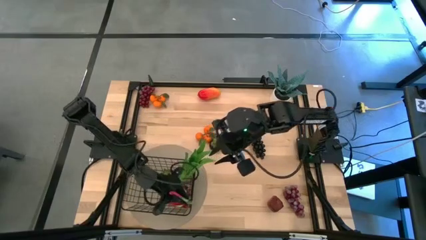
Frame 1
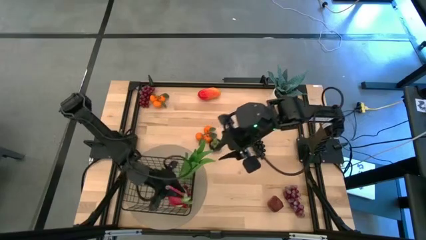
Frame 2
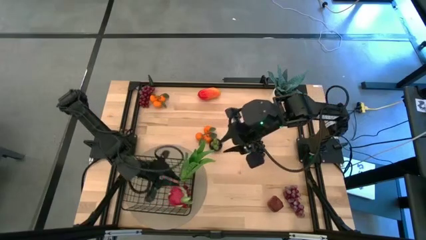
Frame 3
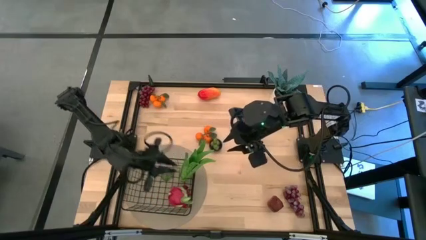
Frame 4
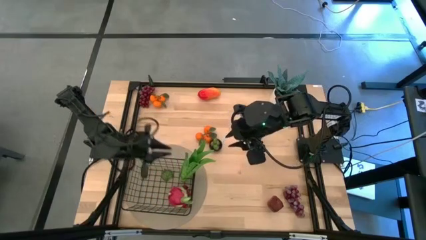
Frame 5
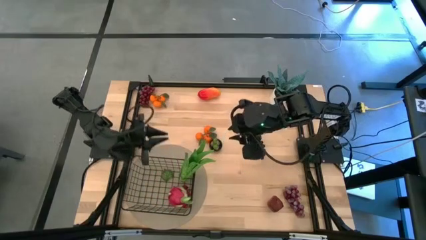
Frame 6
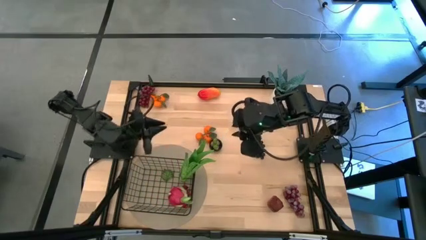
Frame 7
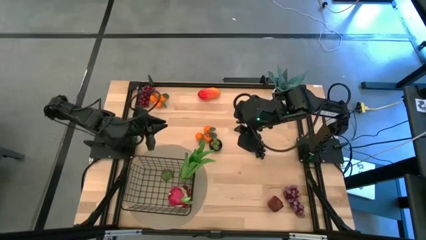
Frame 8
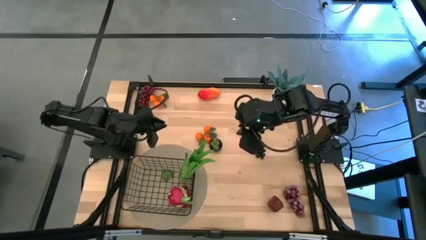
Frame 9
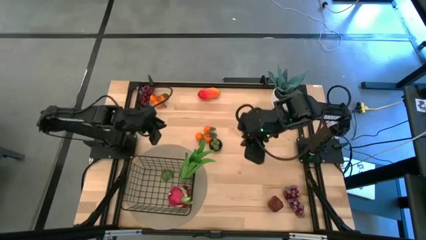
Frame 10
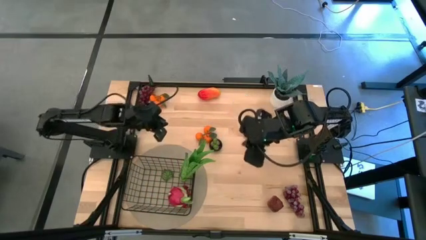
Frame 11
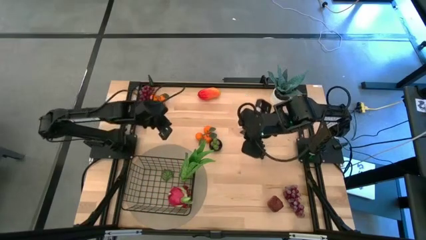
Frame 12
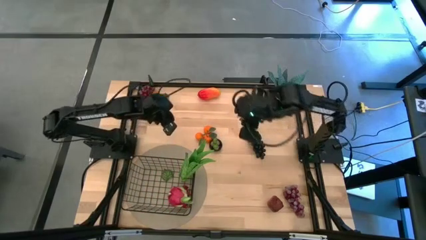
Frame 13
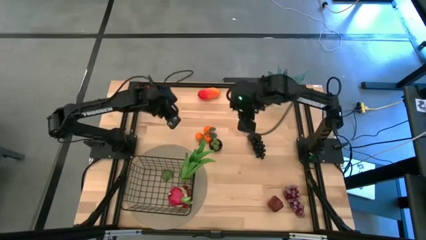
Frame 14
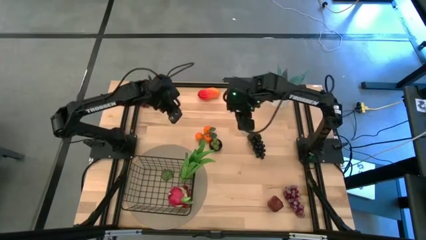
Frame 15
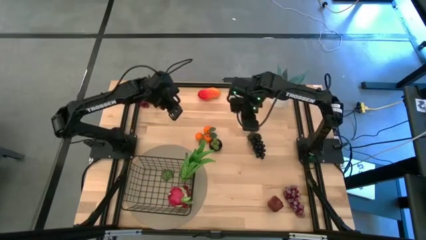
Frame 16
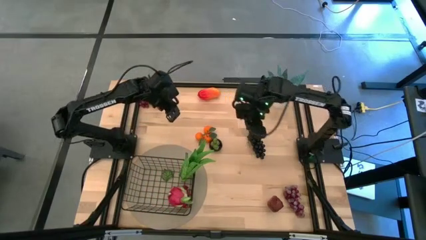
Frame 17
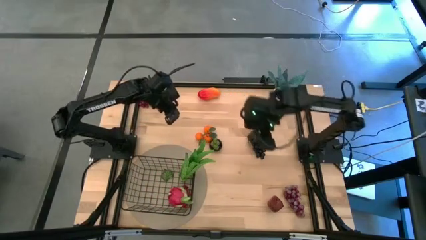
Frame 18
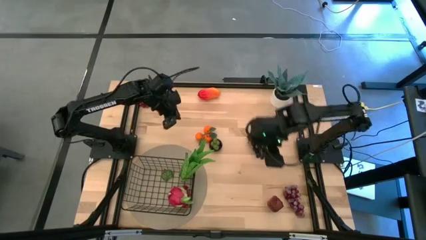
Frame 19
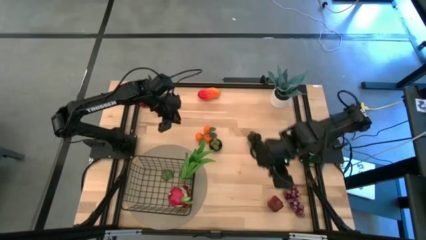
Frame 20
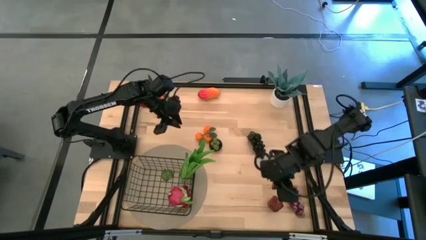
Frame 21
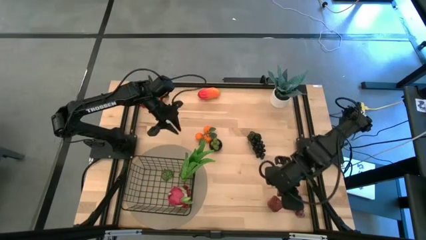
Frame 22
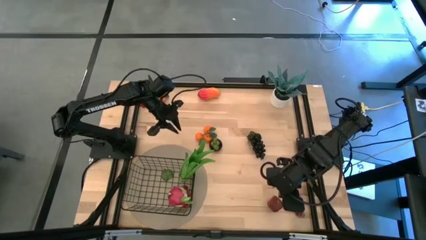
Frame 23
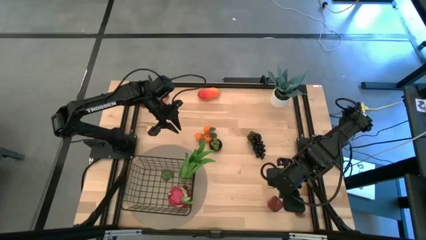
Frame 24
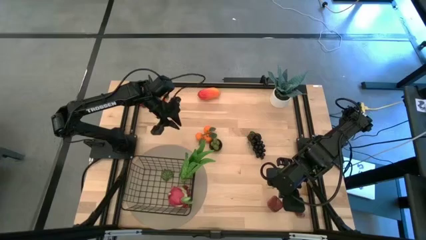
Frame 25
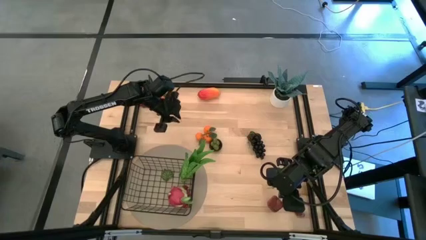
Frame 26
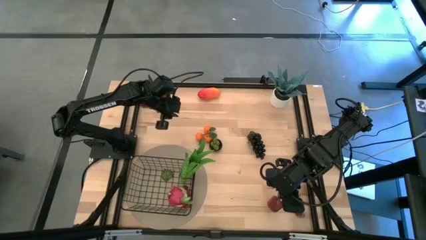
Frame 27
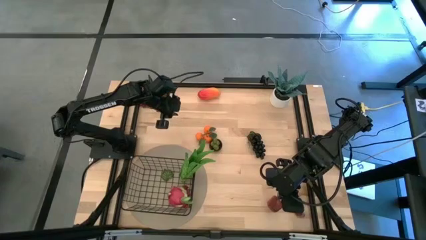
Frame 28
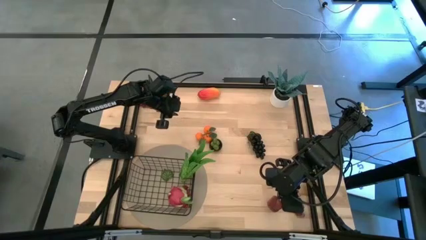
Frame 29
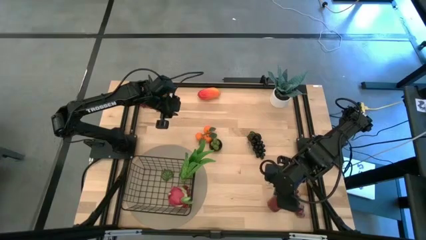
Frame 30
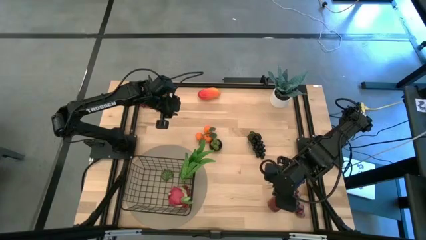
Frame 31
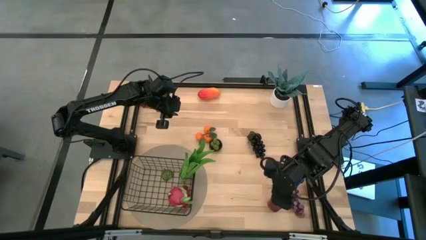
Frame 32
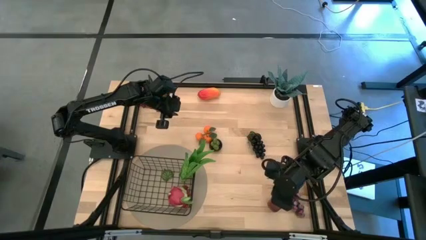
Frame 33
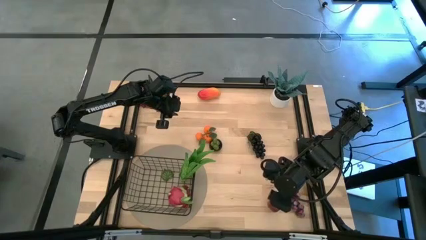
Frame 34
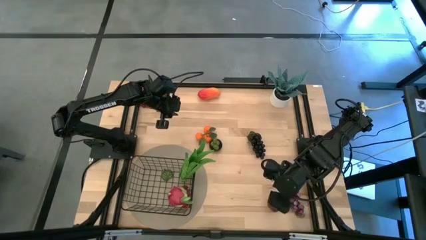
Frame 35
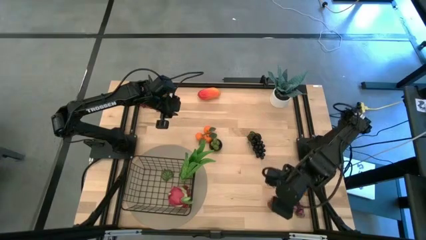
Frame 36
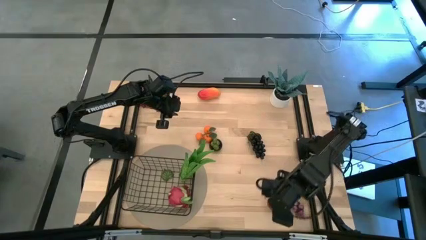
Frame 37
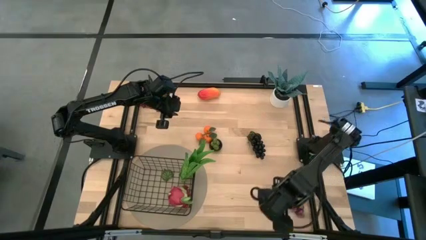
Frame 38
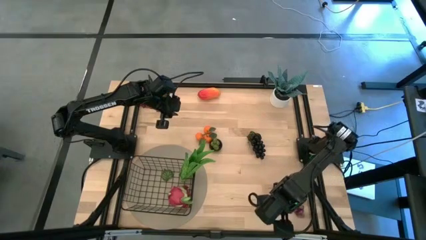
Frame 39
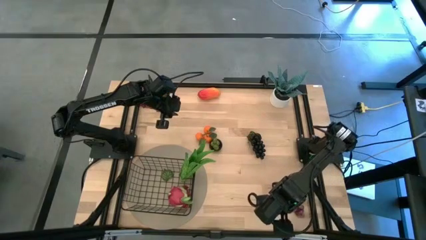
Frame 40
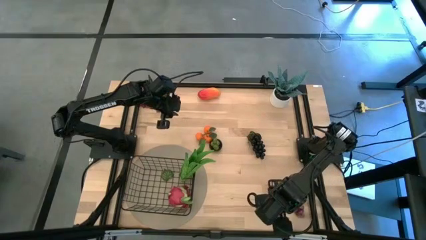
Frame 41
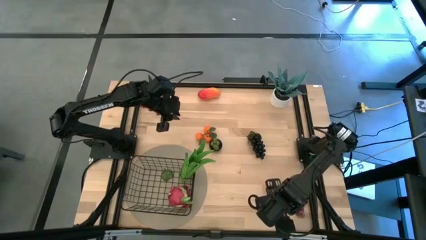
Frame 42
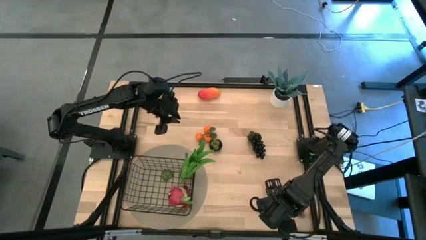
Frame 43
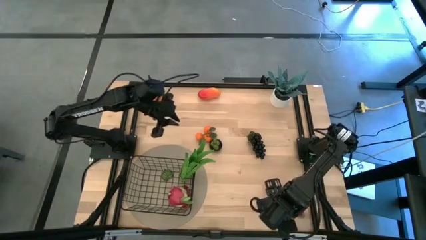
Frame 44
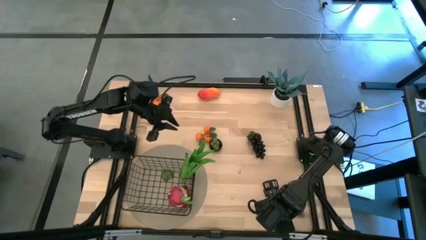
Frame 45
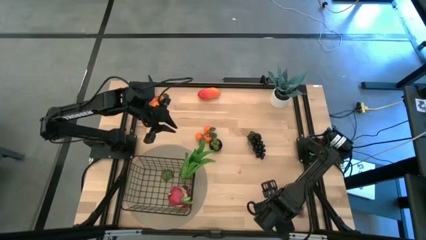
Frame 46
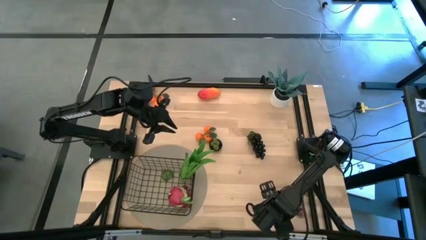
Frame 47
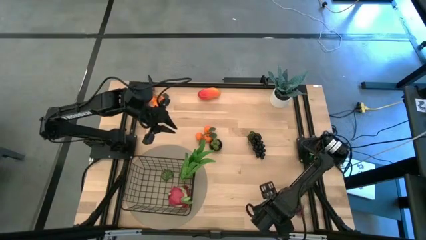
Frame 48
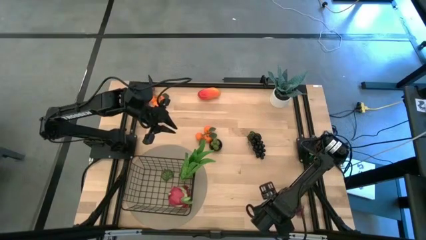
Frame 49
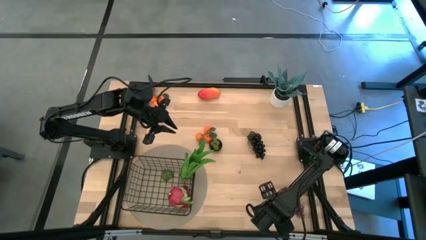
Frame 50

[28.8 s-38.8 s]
Task: Build produce basket
Put the red apple into the black wire basket

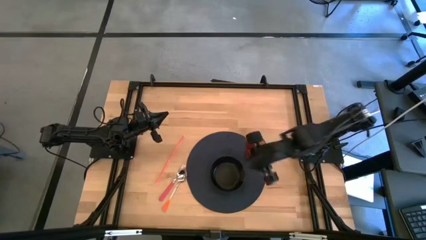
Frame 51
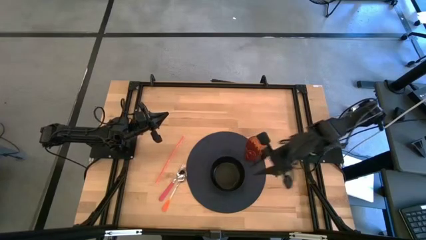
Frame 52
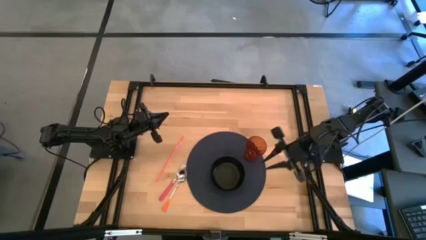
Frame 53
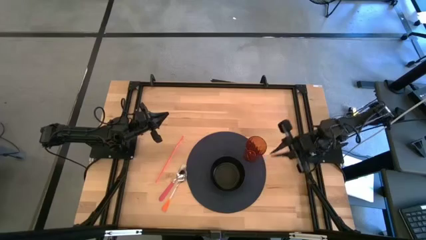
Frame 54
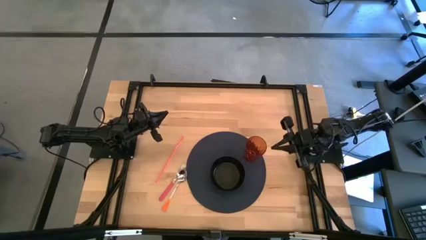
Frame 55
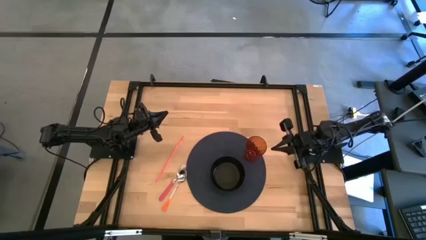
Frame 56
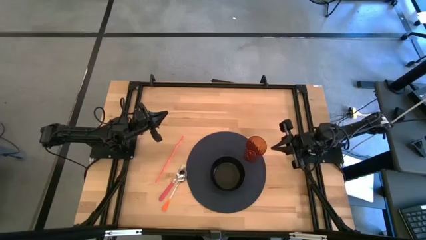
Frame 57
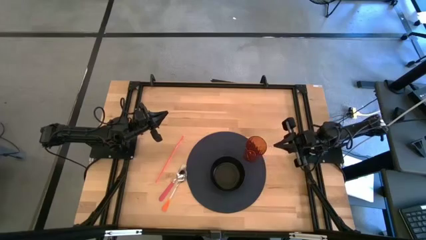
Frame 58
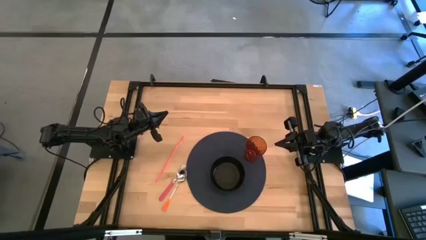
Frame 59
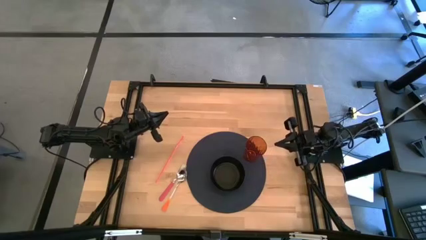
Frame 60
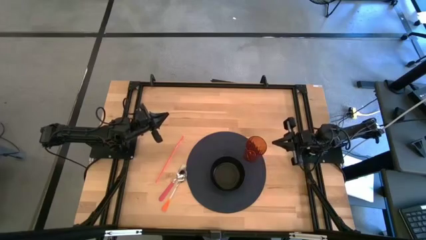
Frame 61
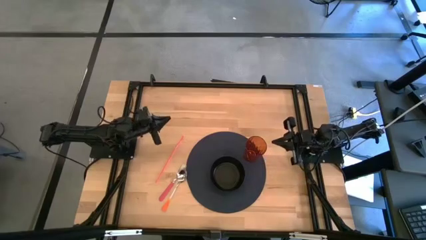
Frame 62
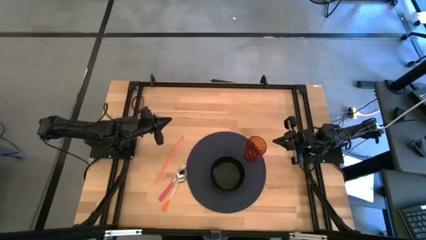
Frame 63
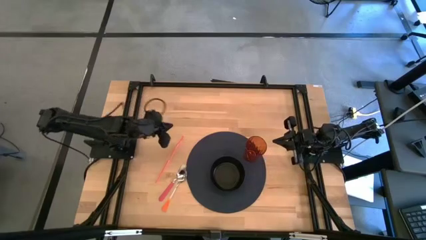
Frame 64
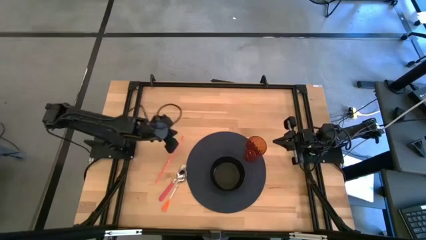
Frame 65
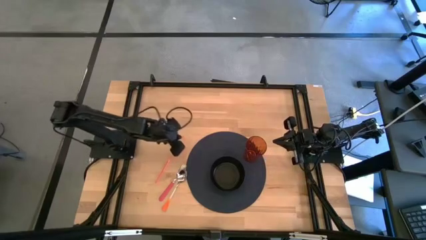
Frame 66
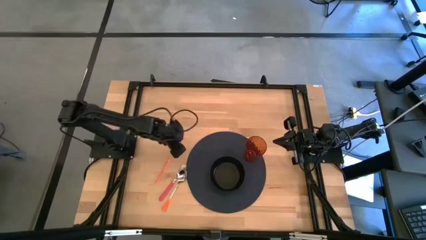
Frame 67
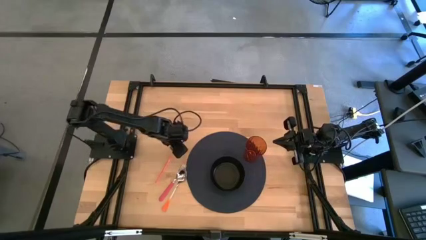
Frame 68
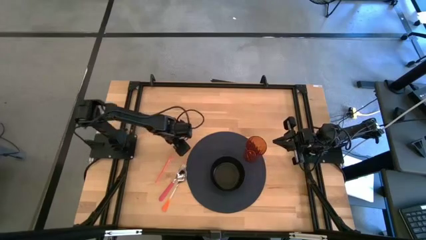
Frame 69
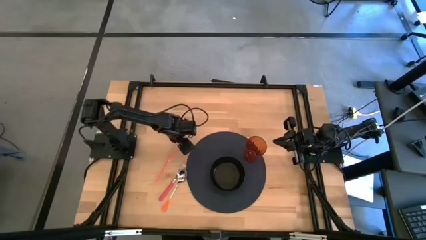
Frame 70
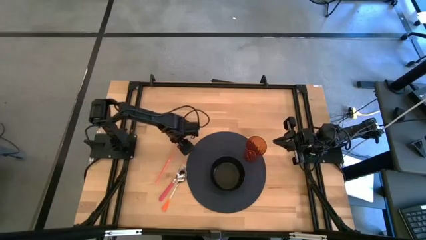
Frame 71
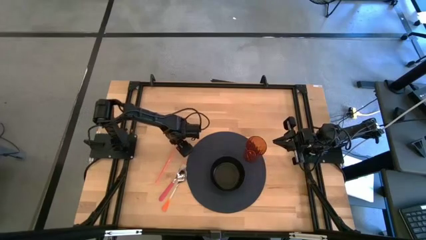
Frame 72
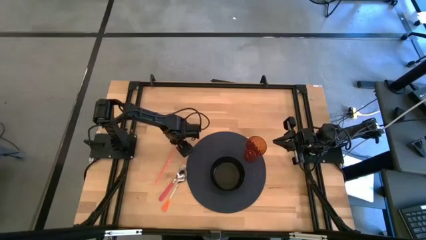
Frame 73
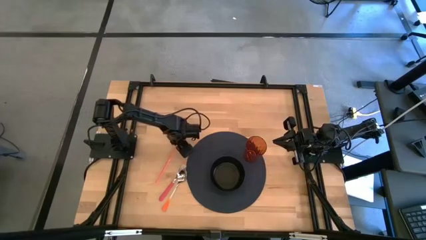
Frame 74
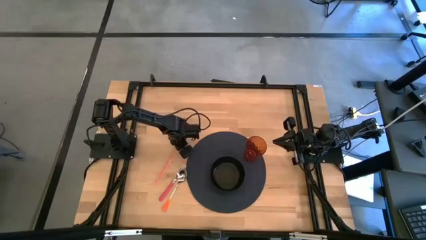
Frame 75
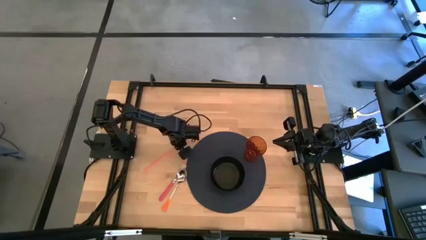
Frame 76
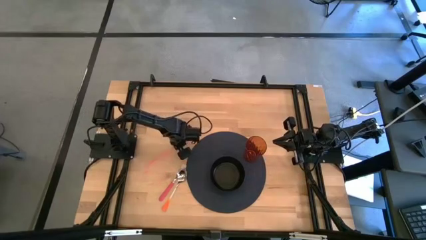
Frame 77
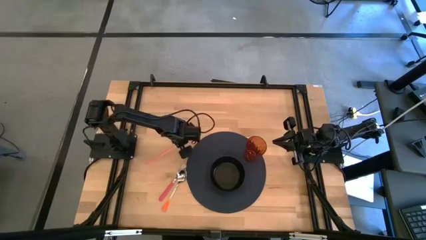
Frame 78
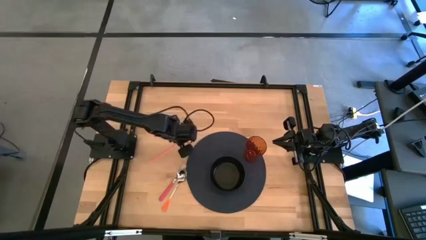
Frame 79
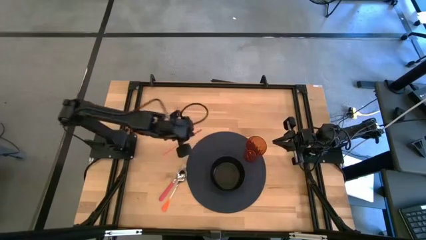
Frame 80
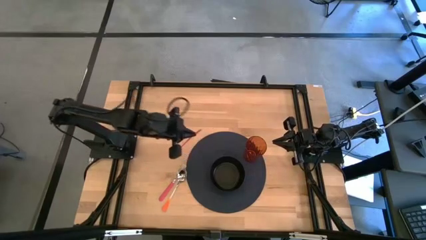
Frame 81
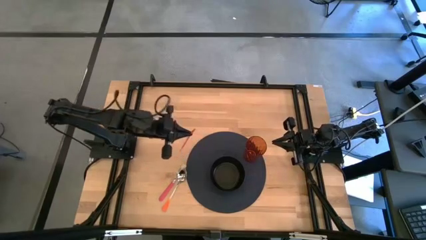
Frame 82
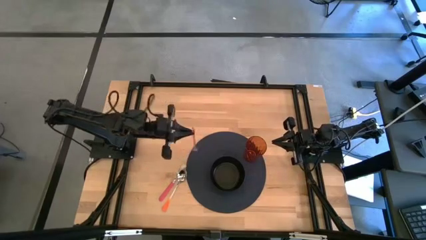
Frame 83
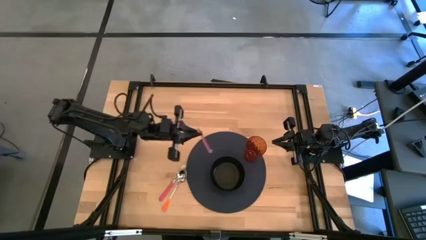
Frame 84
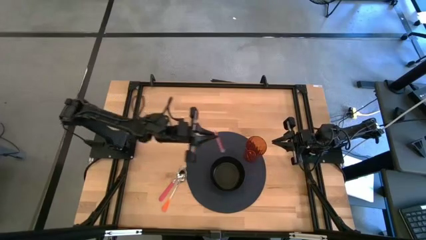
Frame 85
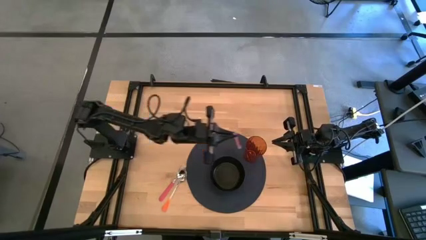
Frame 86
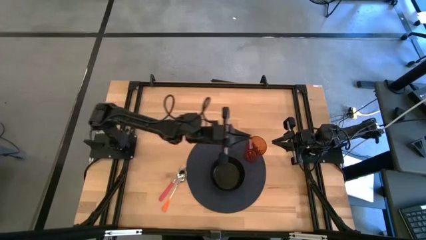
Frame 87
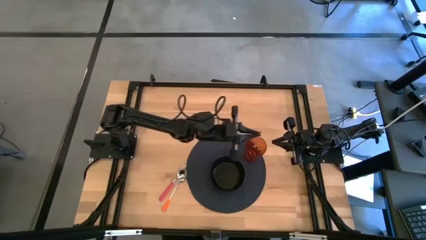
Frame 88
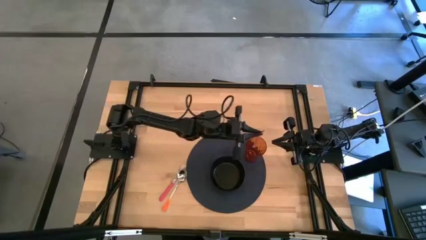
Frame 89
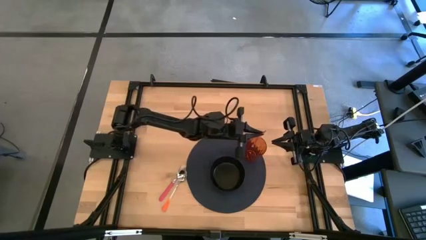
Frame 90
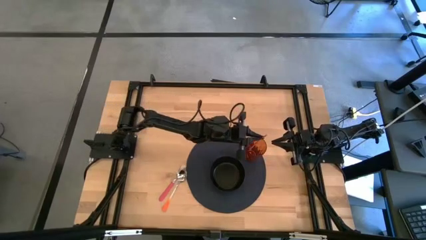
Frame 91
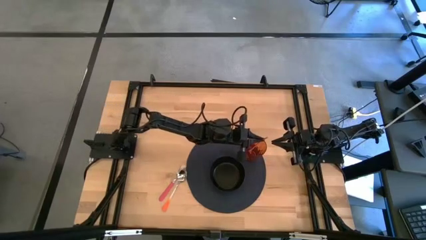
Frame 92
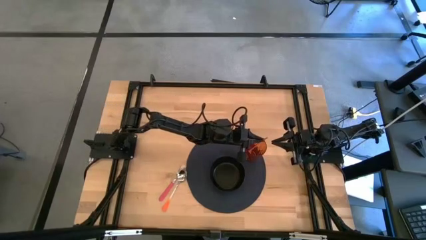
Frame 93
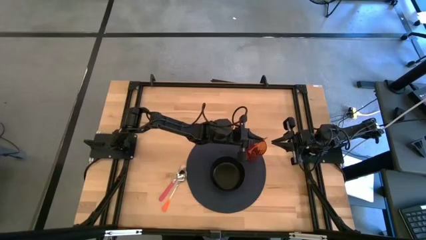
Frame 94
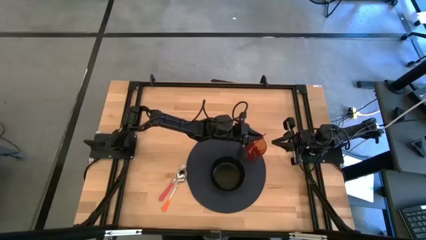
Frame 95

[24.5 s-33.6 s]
Task: Pick & Place Utensil
Put the orange straw into the orange glass on the black mat
